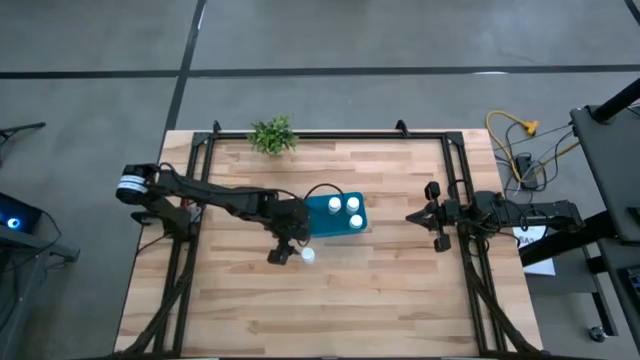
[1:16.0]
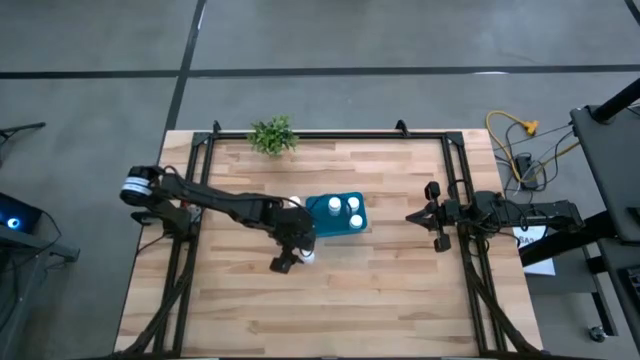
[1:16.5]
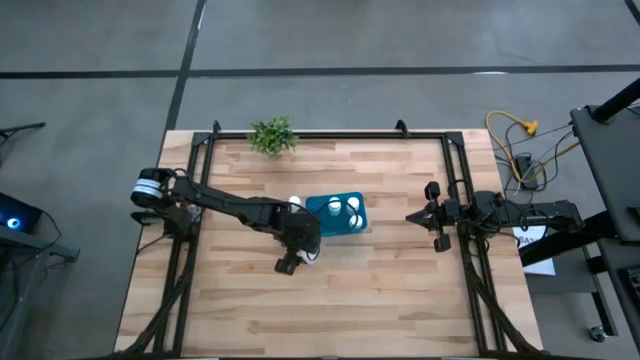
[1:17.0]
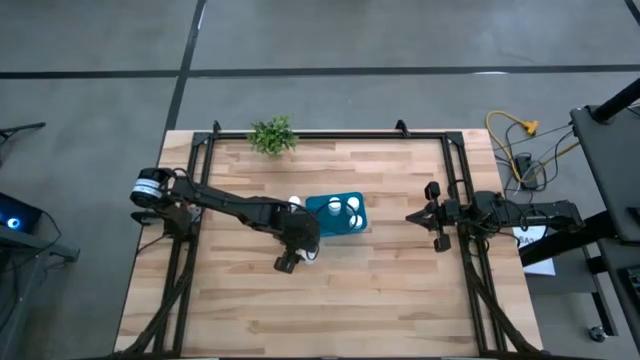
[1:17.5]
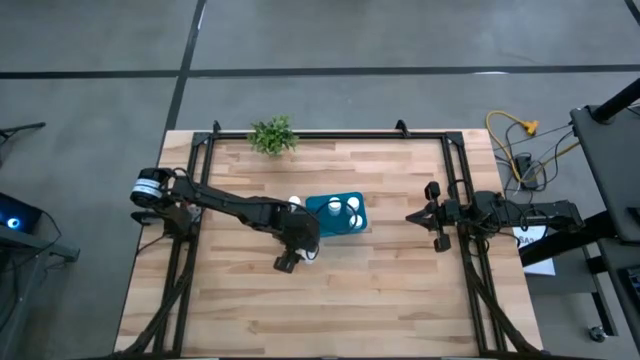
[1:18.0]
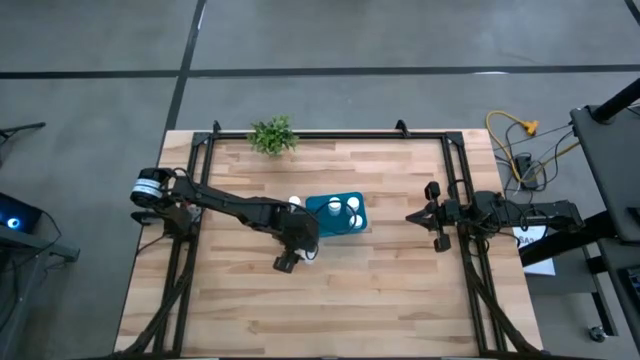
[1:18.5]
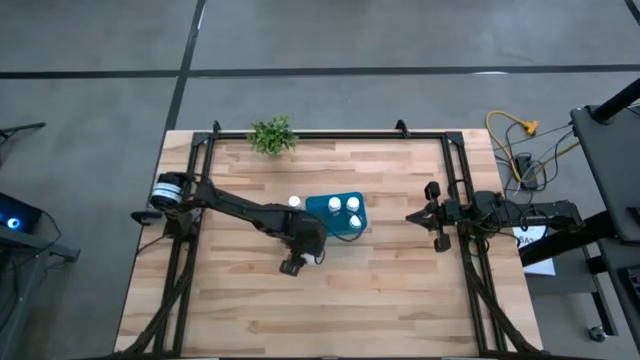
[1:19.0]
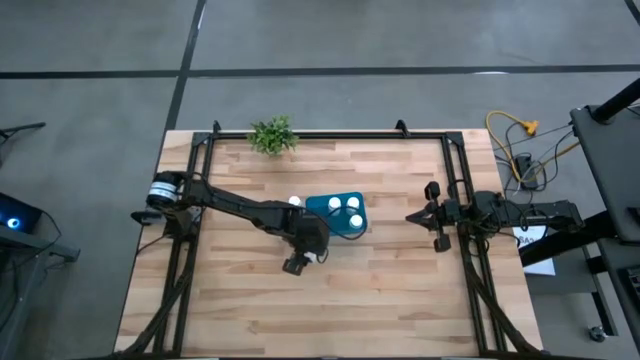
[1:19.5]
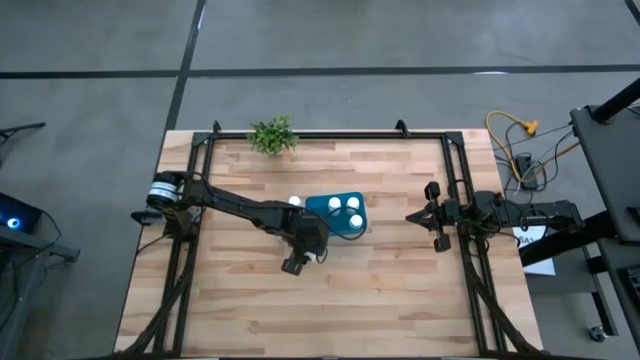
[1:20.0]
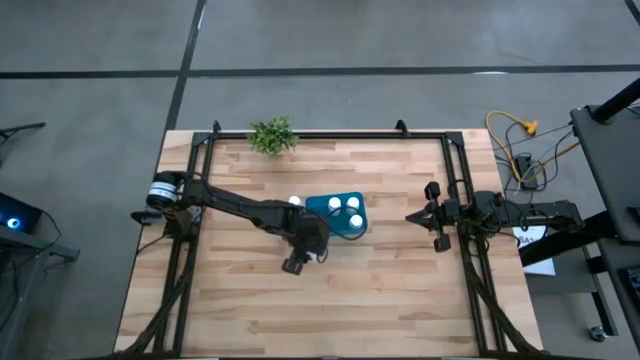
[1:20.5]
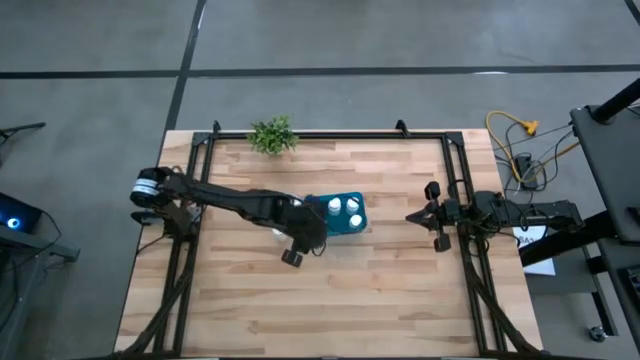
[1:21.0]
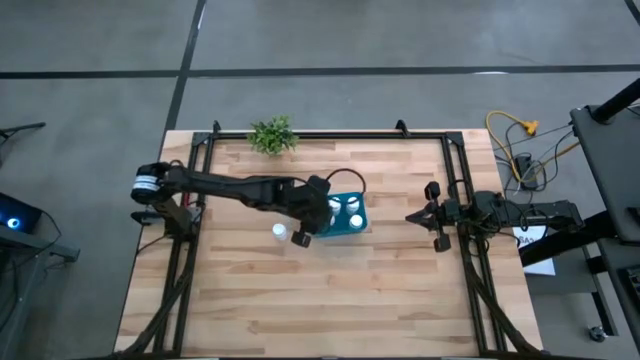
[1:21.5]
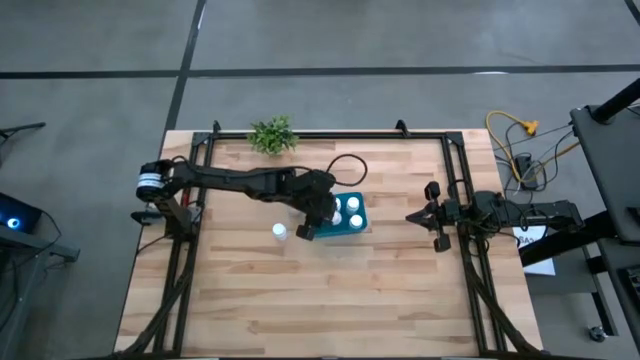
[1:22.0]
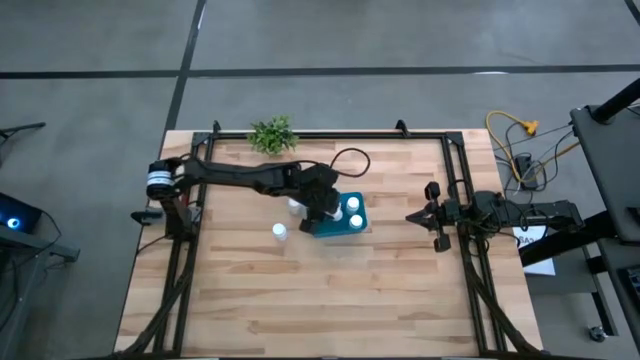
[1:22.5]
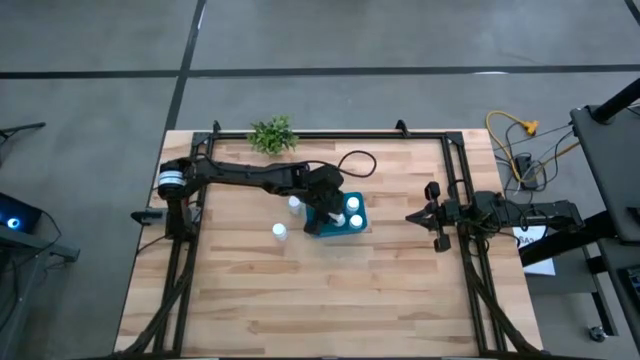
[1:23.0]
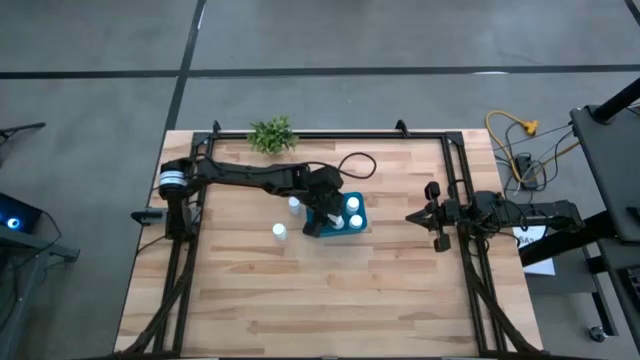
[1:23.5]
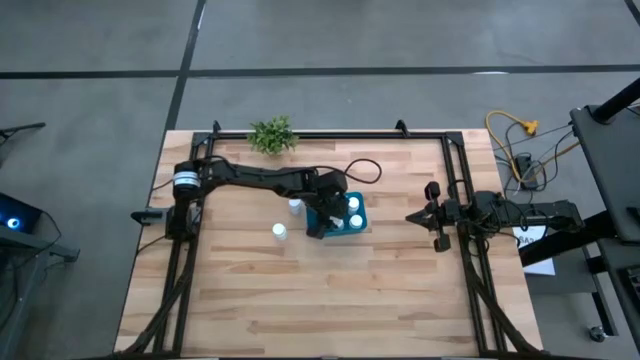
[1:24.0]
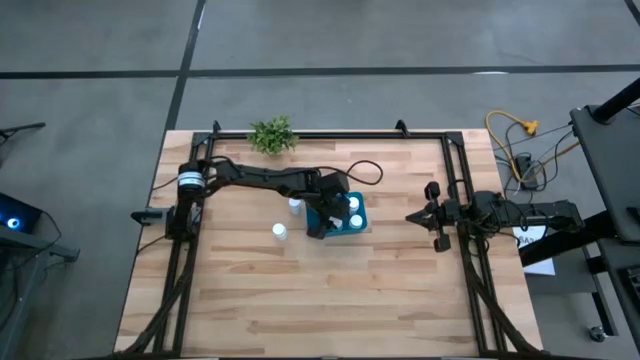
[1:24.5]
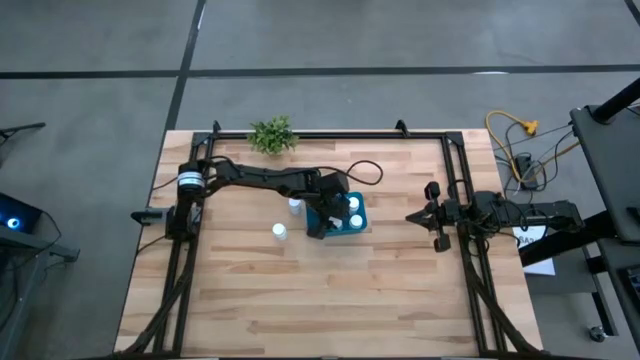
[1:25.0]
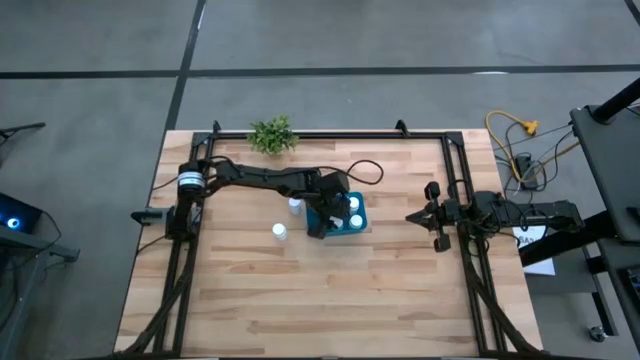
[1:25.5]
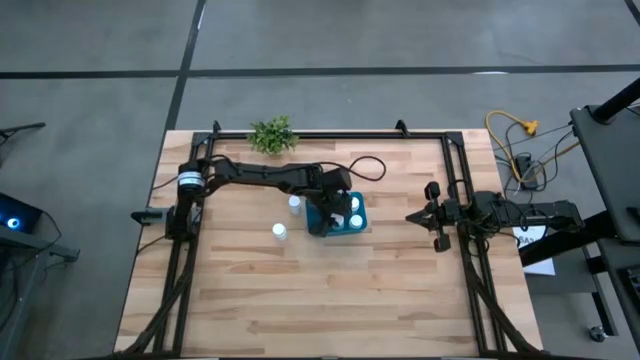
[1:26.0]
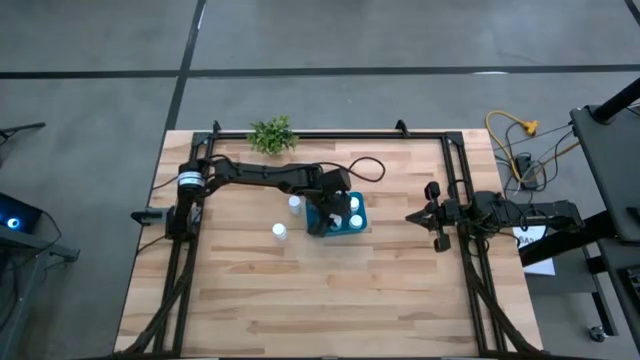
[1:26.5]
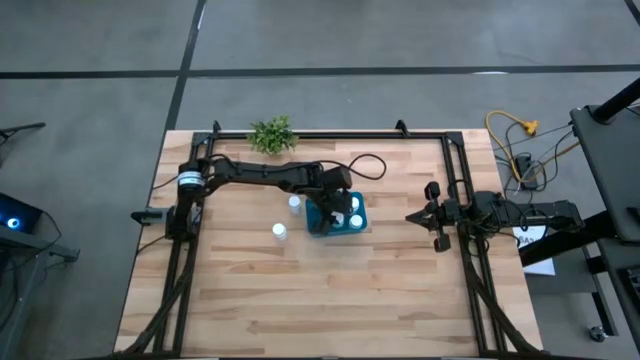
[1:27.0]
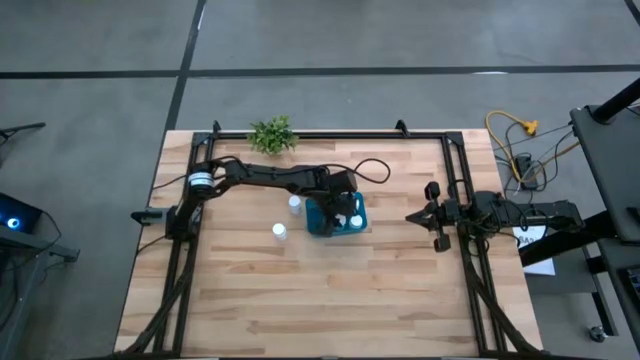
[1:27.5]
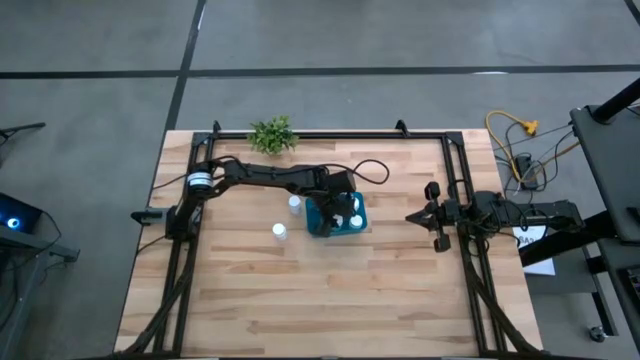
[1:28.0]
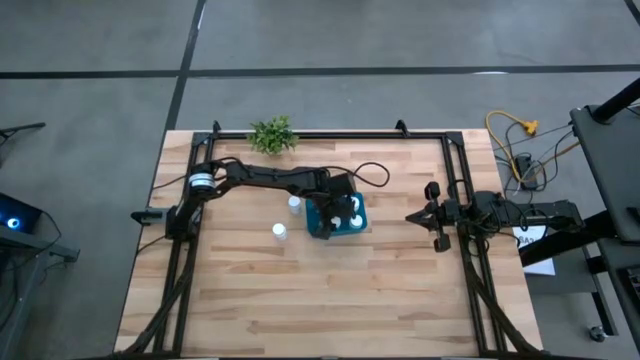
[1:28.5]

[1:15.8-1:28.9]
Task: Pick and place pill bottles into a basket
Put the white medicine bottle into the blue bin

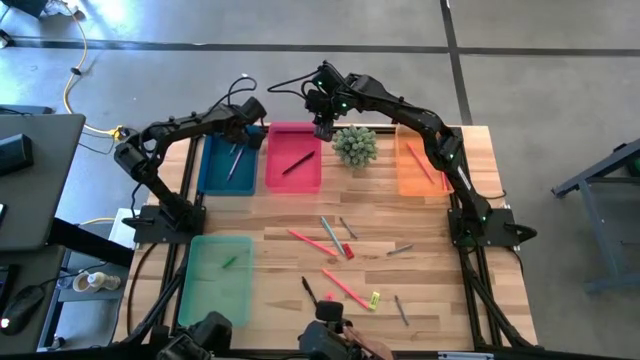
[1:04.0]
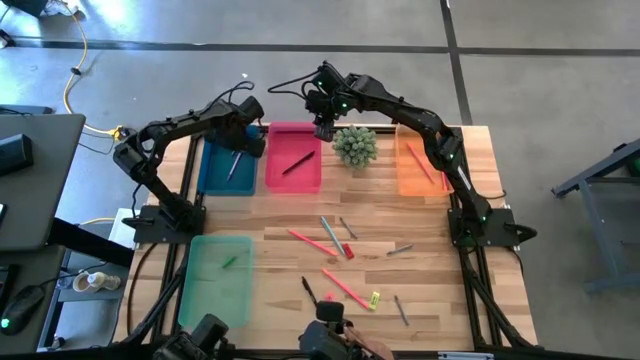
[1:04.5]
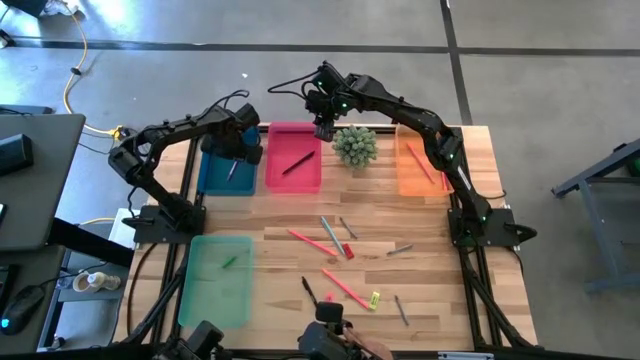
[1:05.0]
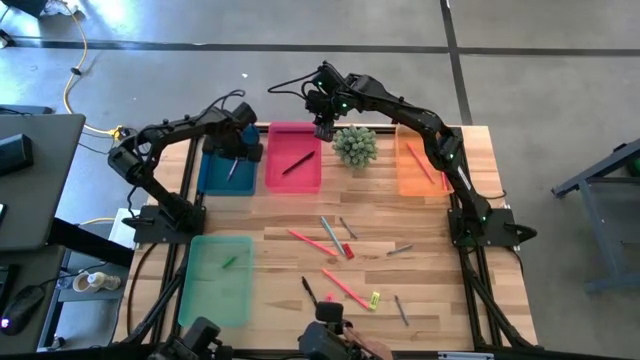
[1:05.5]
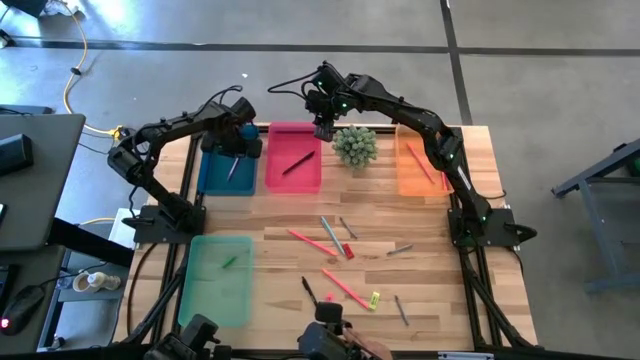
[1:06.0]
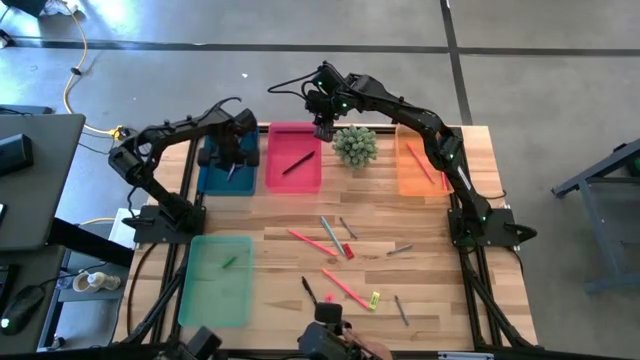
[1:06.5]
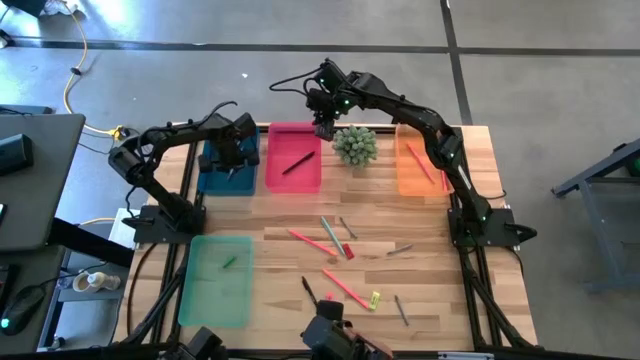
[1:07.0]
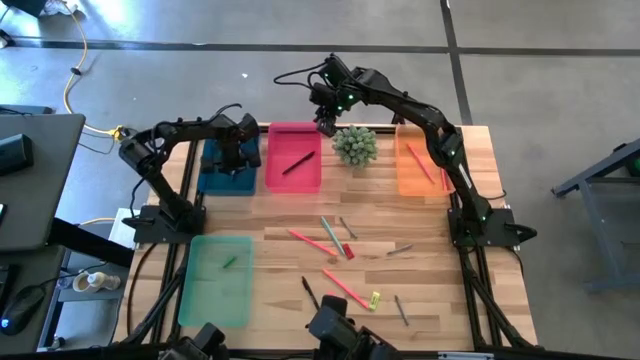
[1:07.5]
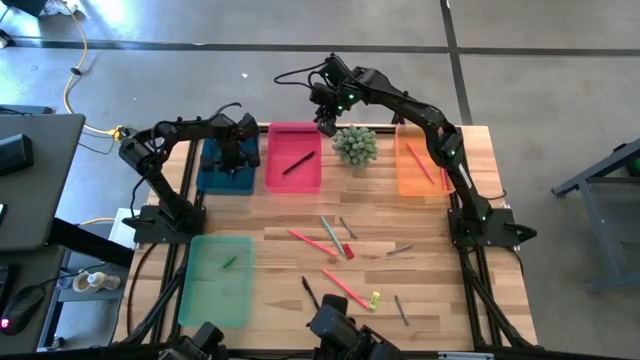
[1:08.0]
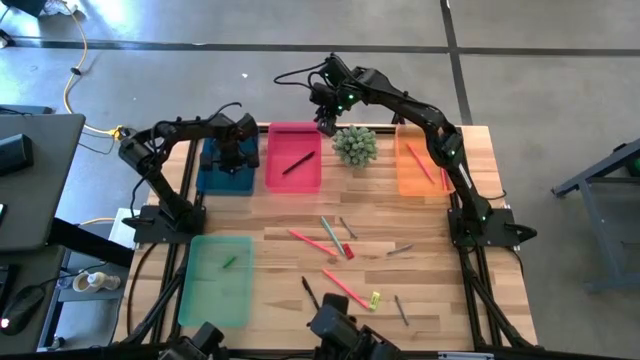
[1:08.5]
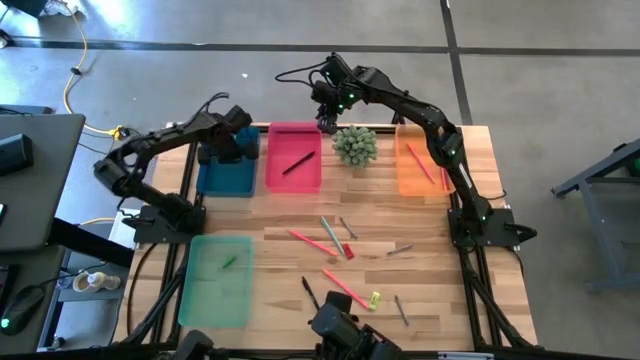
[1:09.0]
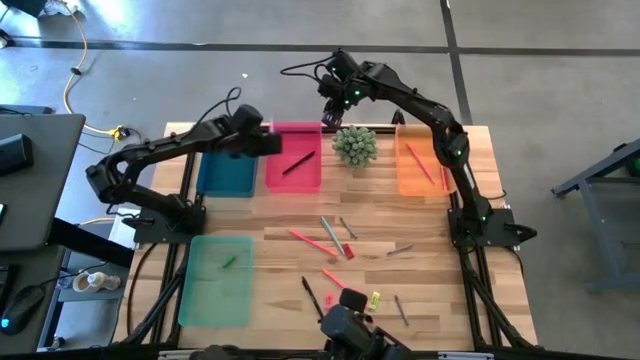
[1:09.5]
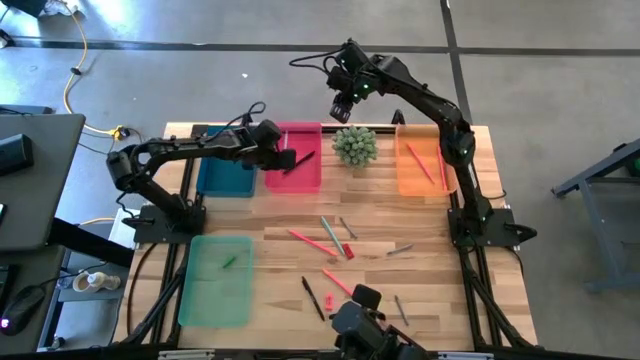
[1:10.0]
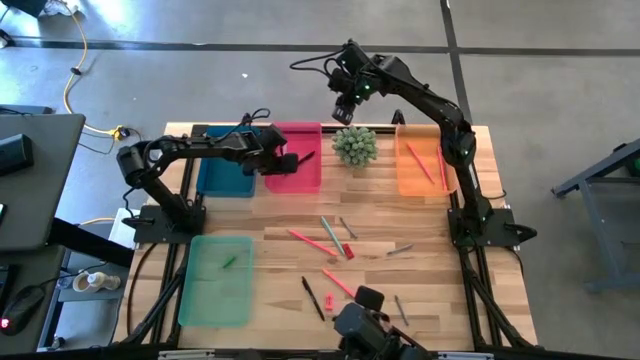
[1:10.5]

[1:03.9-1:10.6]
Task: Sort crayons/erasers/pens/pencils in bins
Put the purple pen into the pink bin
